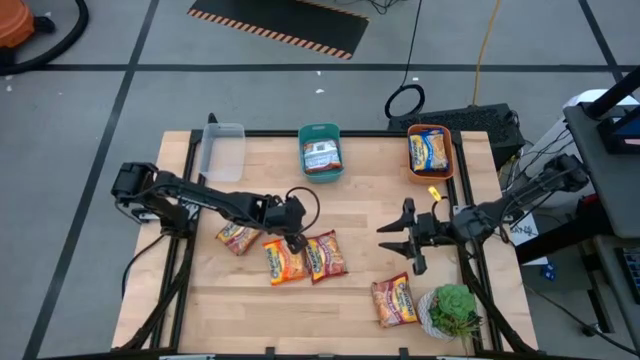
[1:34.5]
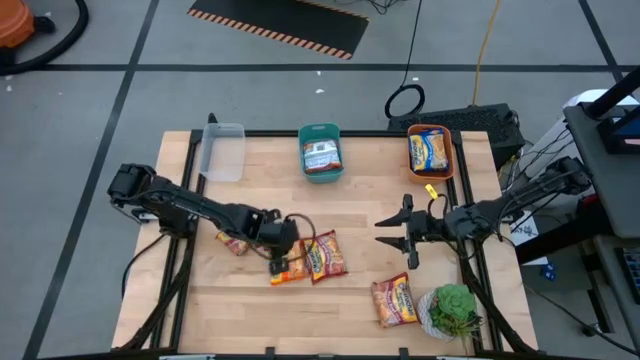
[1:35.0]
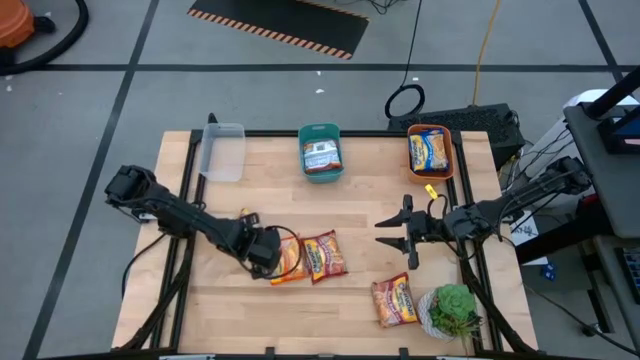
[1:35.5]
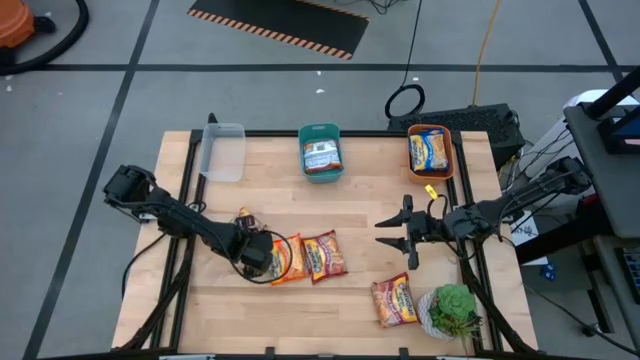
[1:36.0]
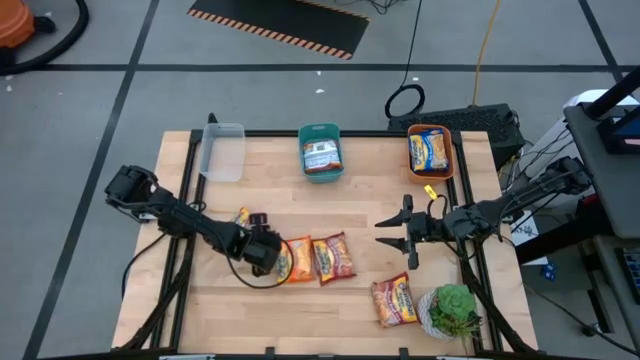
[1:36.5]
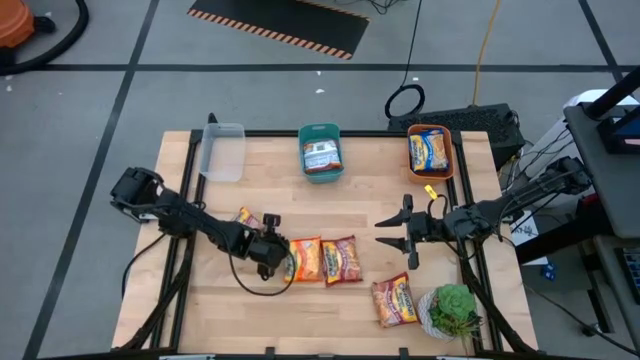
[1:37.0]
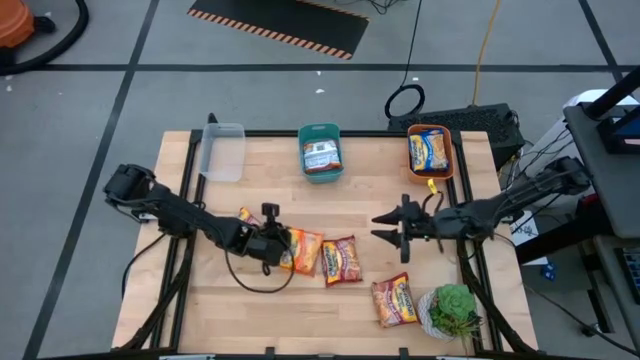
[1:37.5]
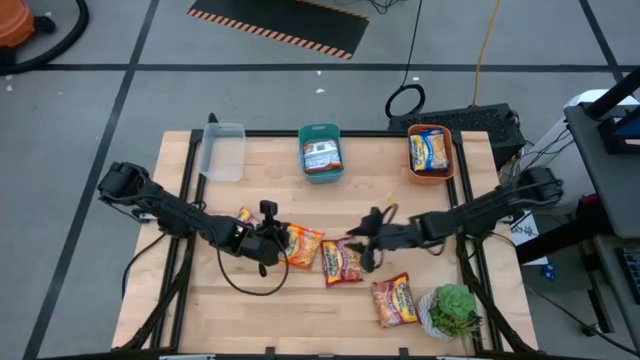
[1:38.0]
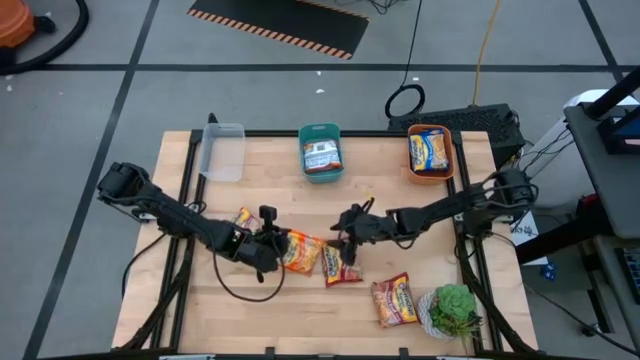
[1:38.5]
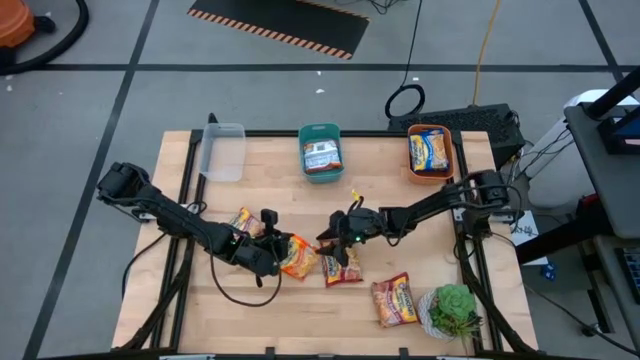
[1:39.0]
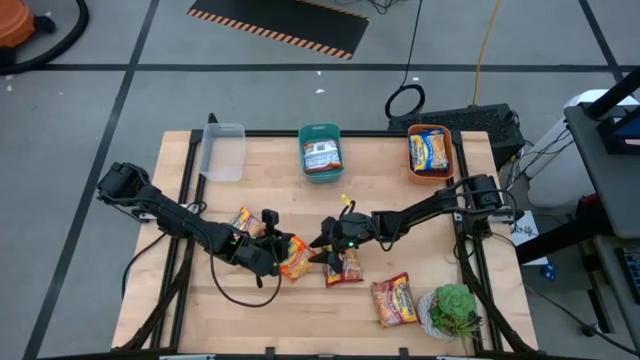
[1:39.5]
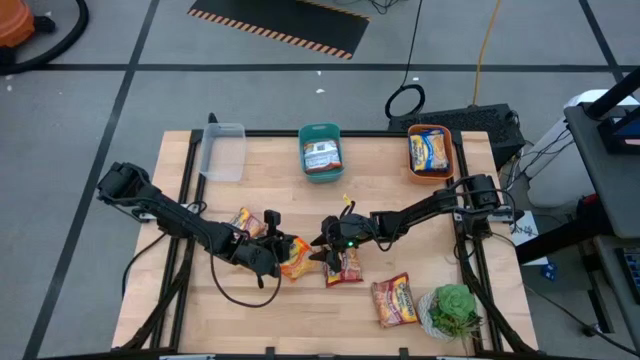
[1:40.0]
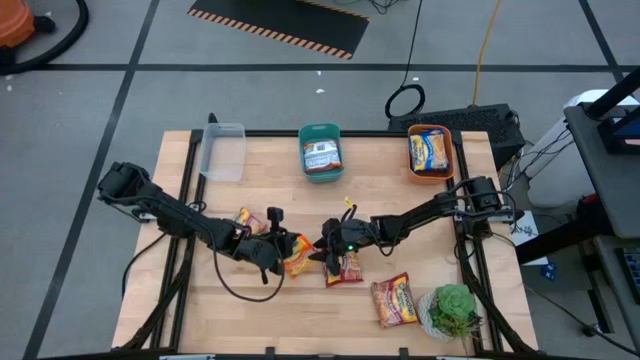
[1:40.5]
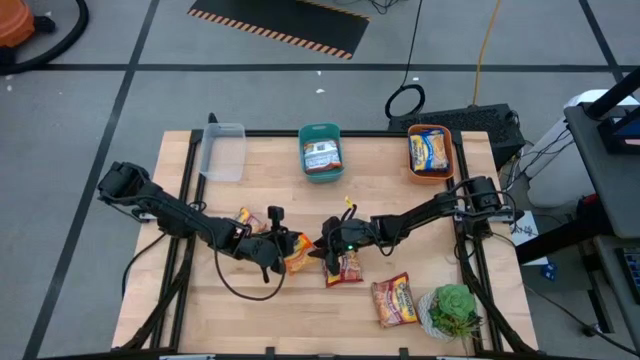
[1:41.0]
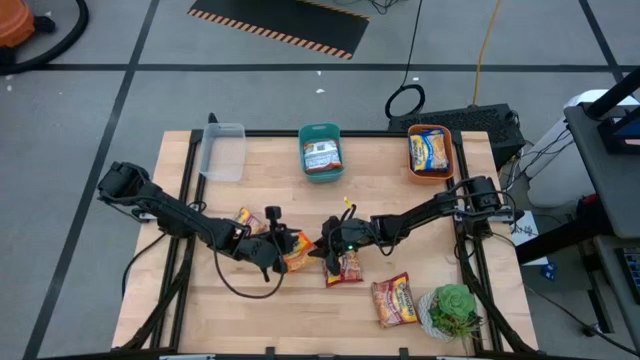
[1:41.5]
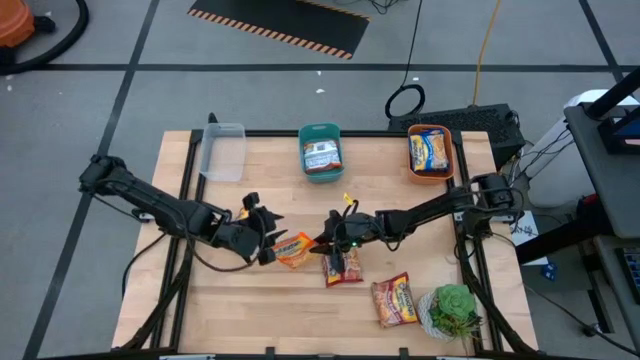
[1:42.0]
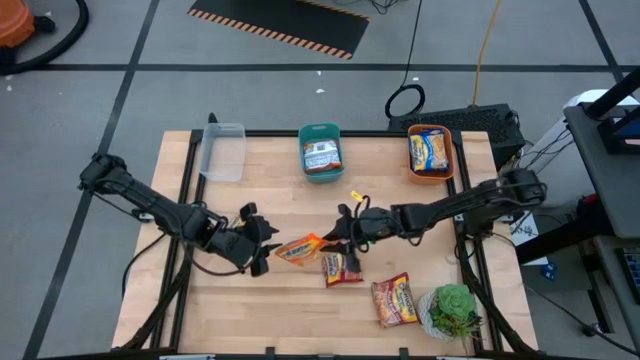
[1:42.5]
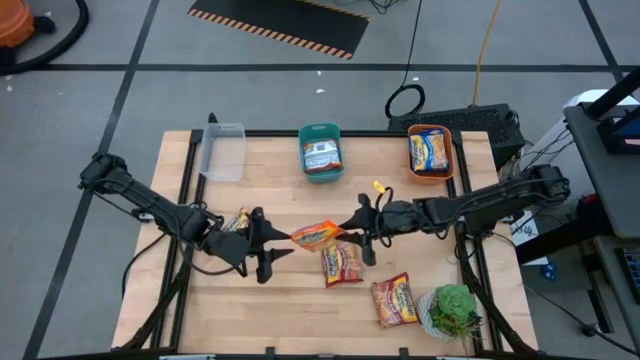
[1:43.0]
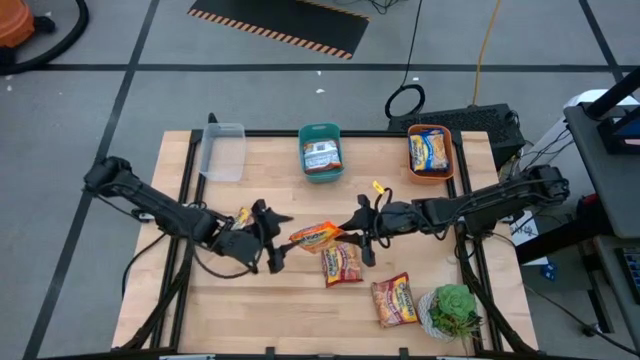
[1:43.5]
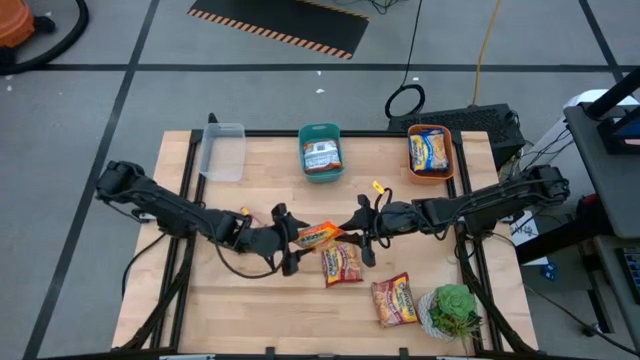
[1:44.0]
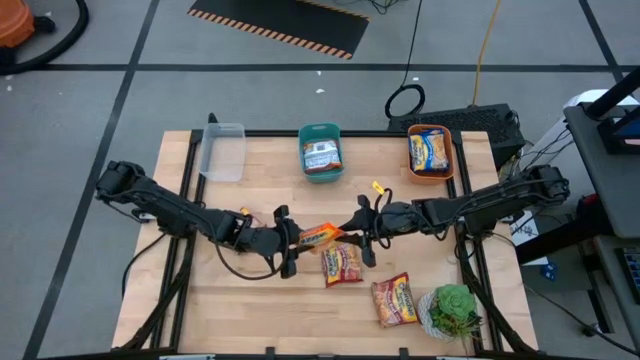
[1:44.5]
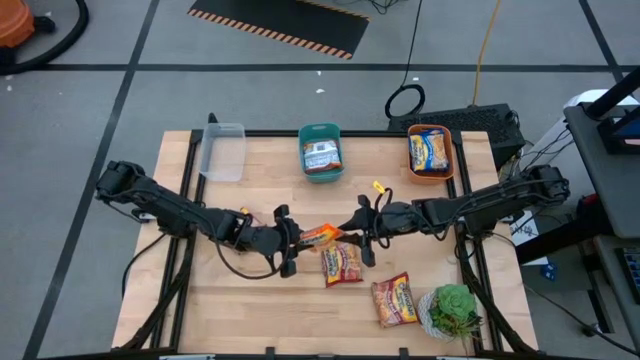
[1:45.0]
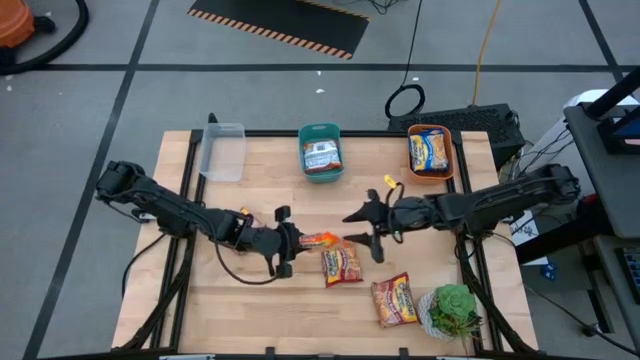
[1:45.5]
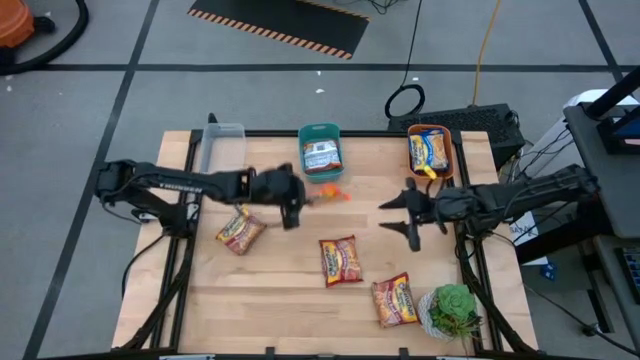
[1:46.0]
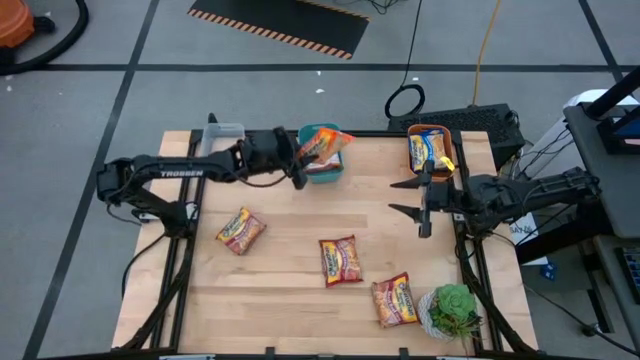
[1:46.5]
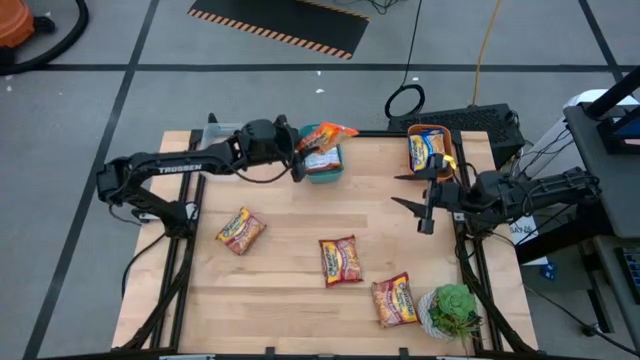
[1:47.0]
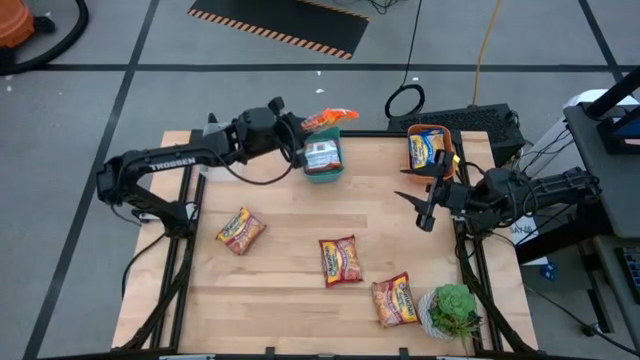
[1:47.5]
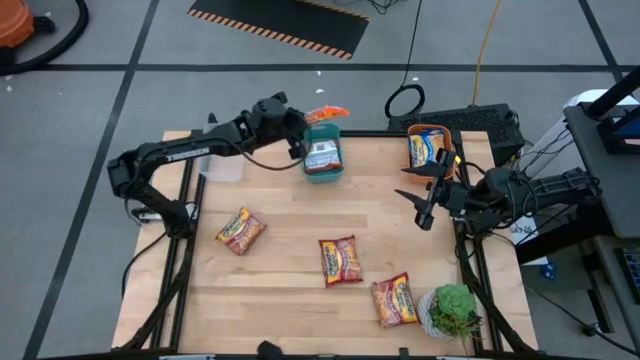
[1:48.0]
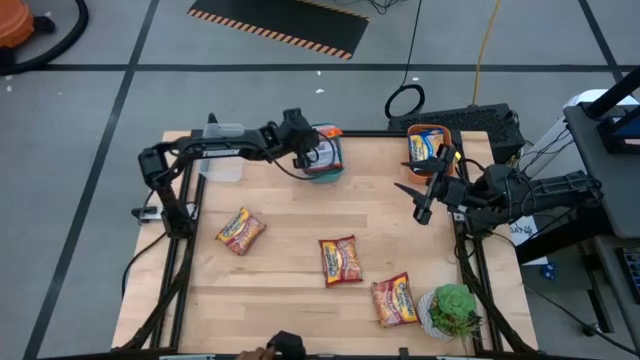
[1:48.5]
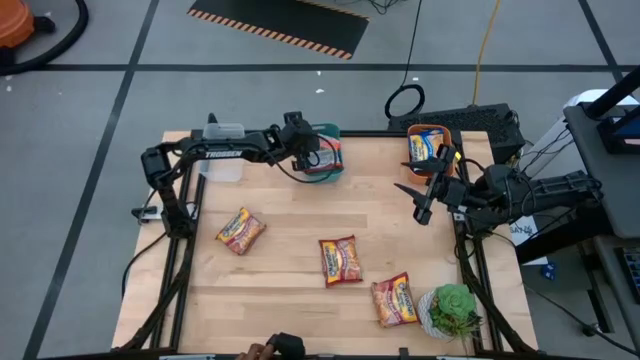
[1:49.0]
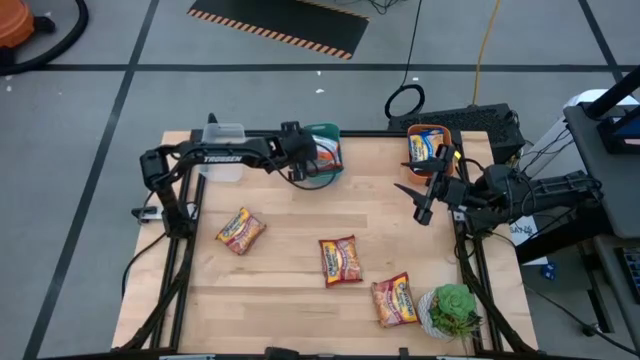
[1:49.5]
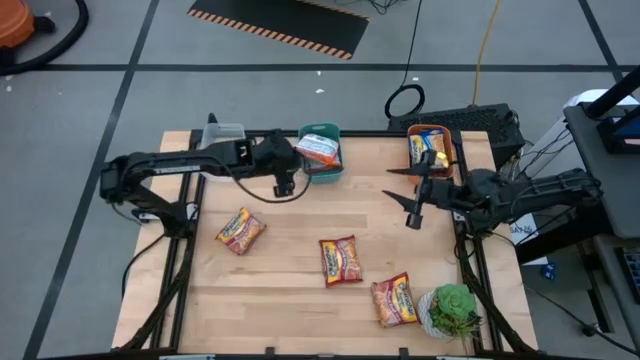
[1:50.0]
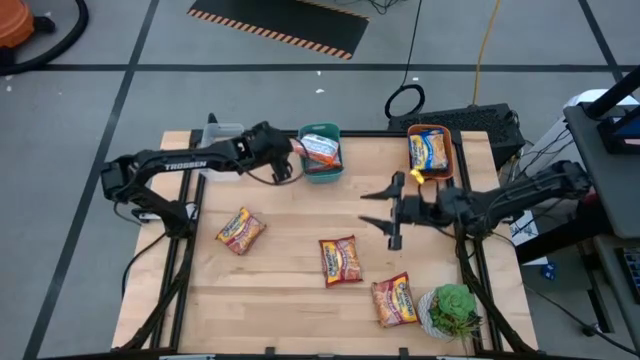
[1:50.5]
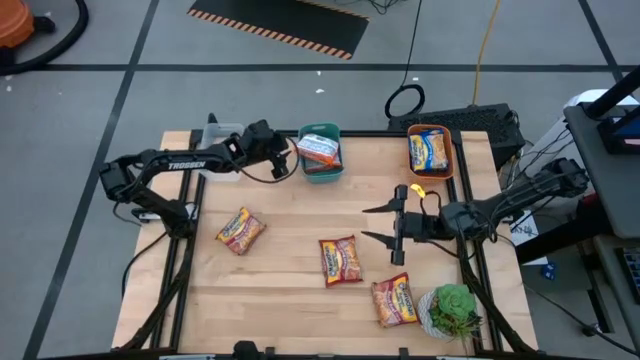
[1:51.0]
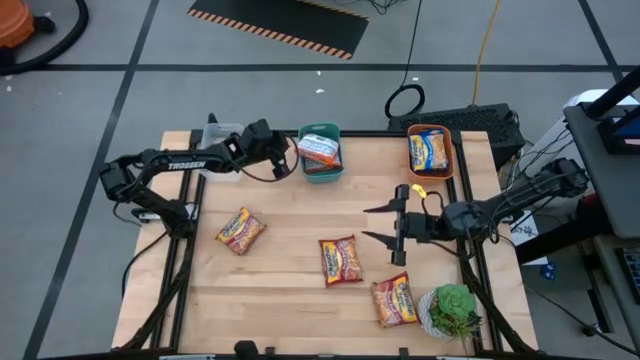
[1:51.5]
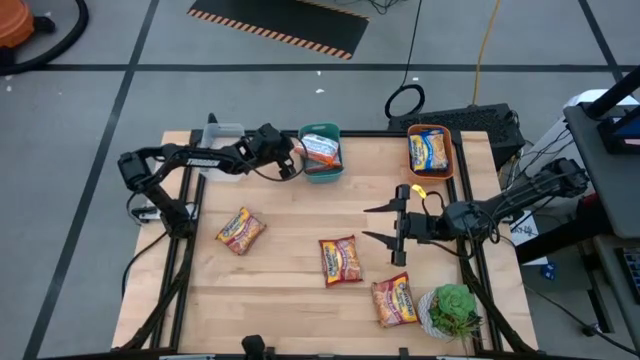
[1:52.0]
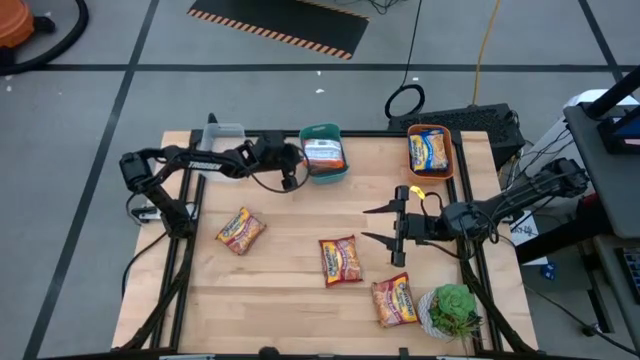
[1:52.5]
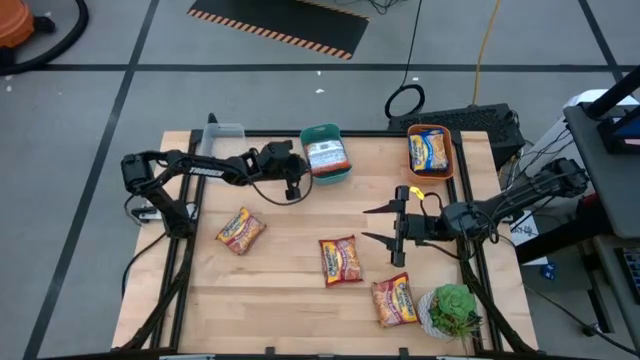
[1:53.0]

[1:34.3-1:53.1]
Task: Sort Maruchan noodles
Put the orange noodle pack into the blue bin

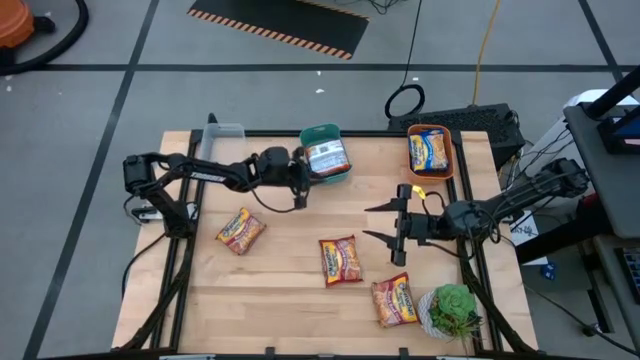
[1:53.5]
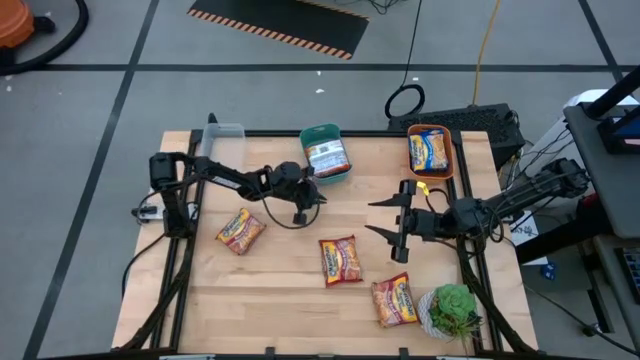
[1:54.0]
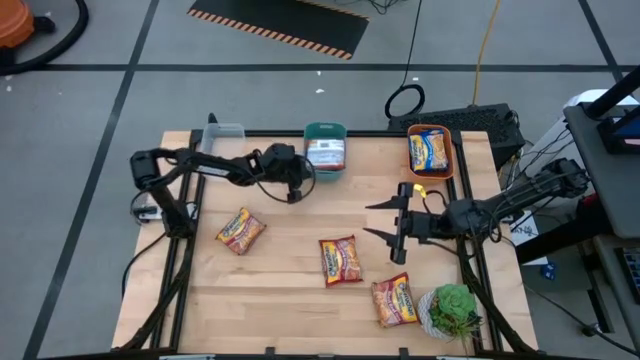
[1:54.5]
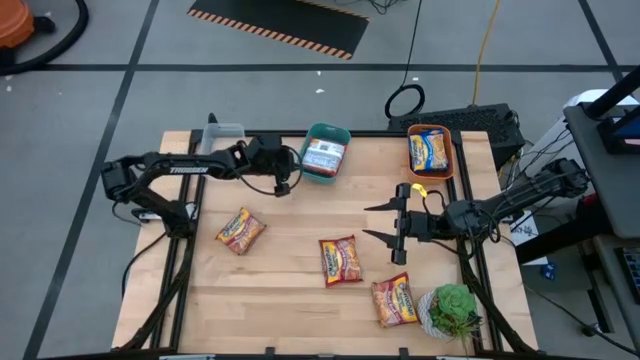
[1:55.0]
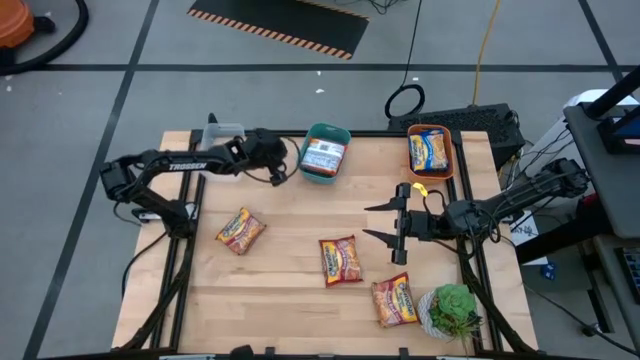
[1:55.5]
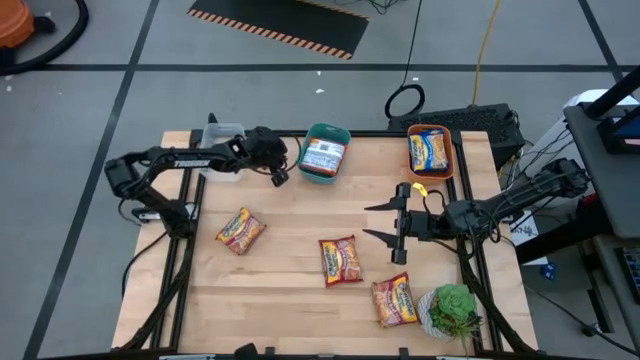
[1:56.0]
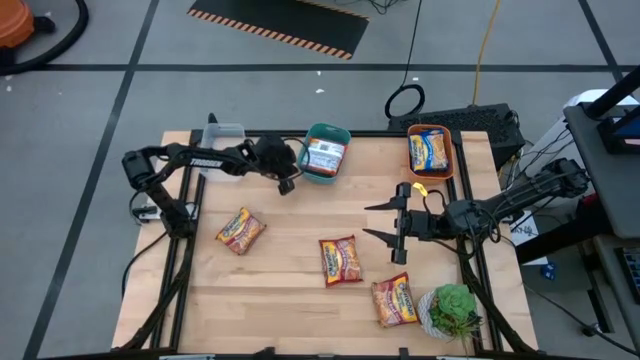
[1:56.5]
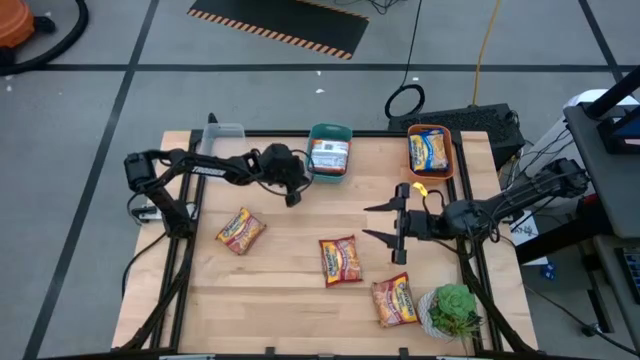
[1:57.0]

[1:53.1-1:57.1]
Adjust the blue bin
